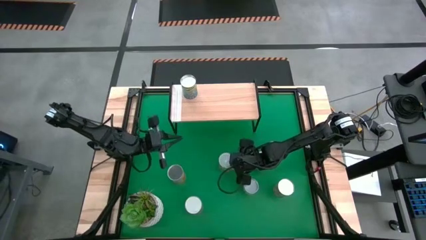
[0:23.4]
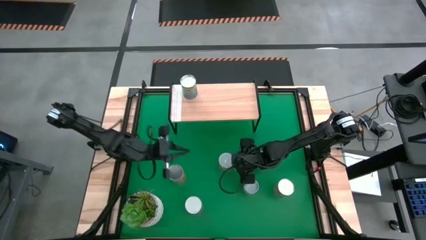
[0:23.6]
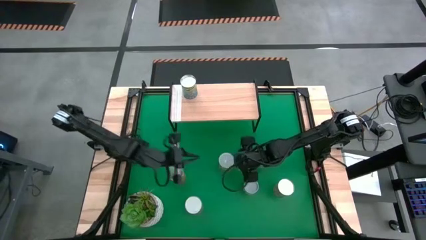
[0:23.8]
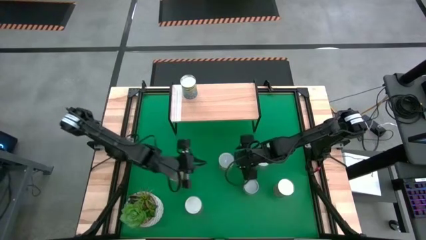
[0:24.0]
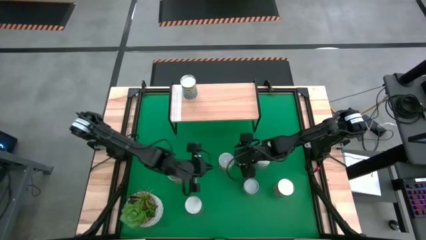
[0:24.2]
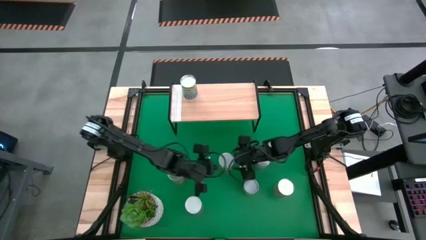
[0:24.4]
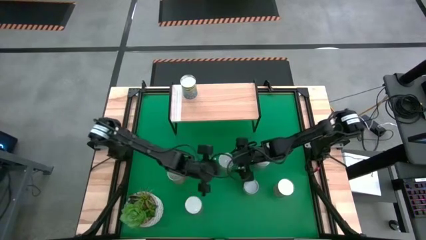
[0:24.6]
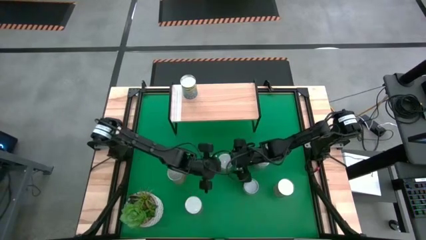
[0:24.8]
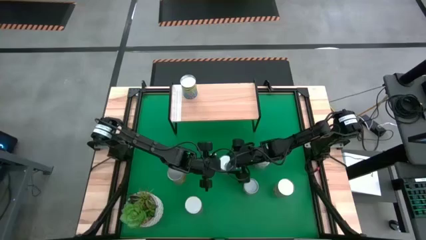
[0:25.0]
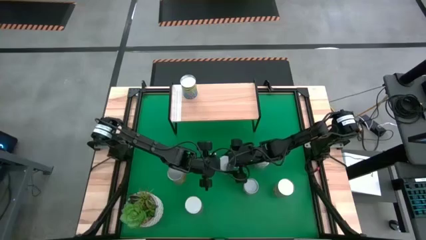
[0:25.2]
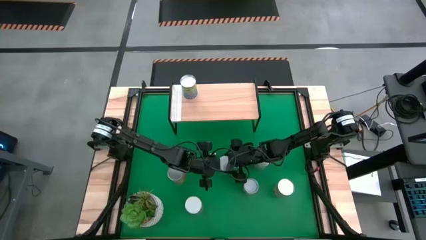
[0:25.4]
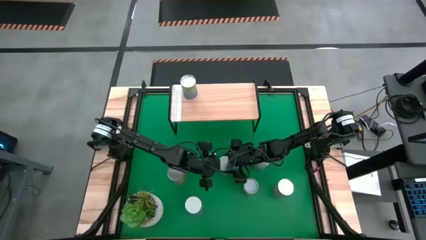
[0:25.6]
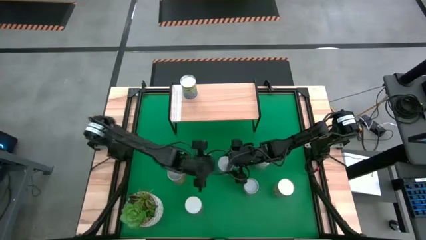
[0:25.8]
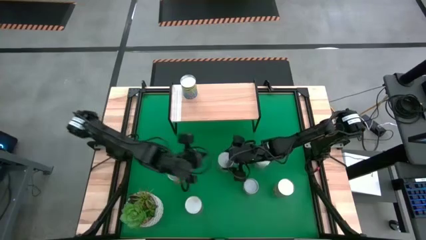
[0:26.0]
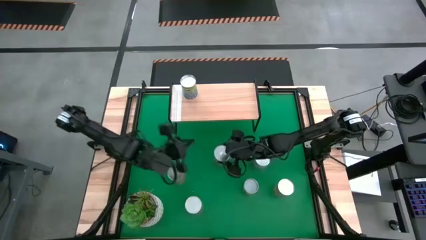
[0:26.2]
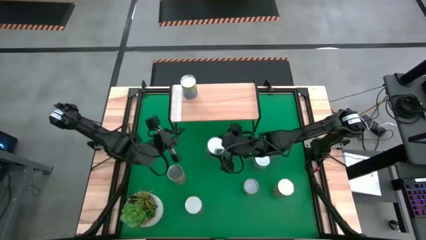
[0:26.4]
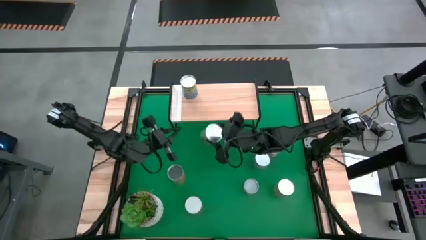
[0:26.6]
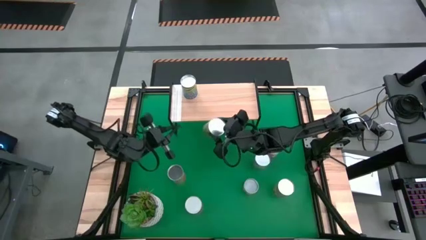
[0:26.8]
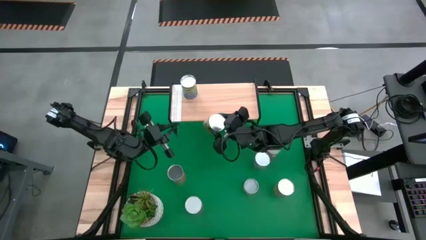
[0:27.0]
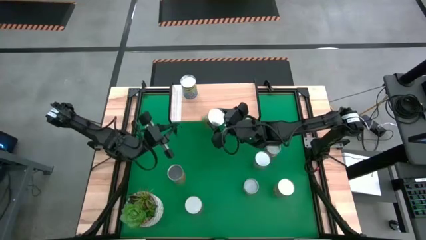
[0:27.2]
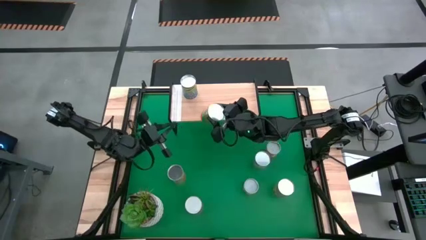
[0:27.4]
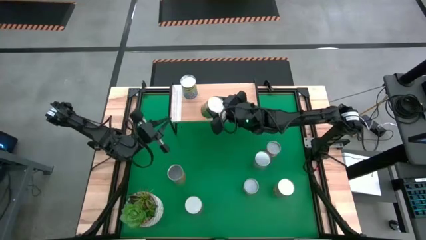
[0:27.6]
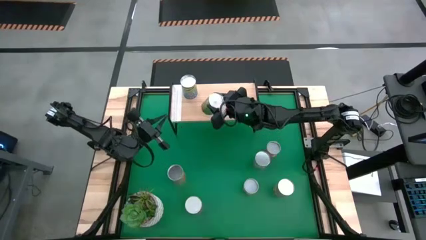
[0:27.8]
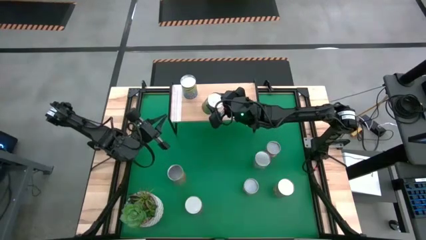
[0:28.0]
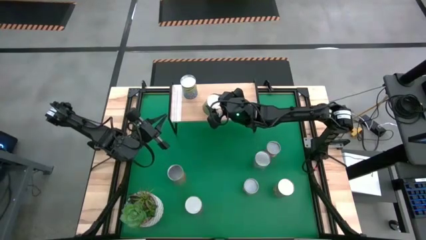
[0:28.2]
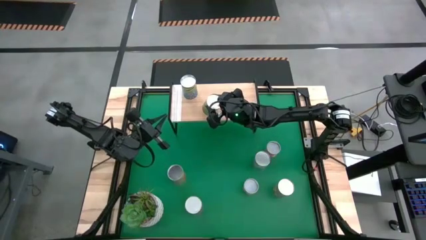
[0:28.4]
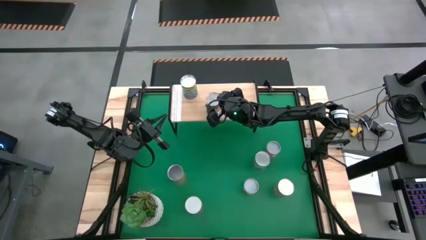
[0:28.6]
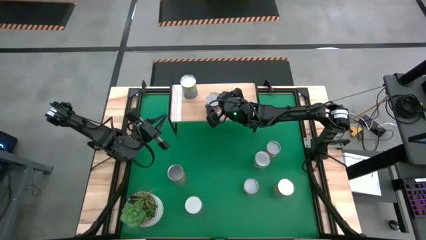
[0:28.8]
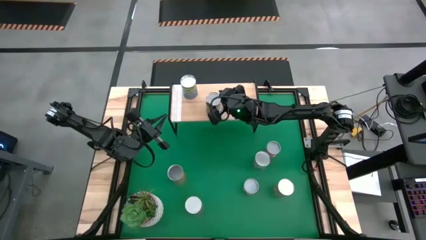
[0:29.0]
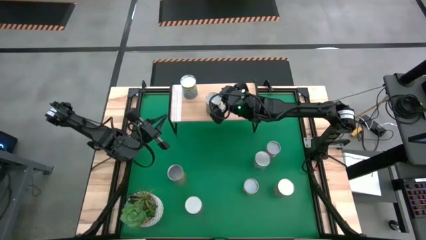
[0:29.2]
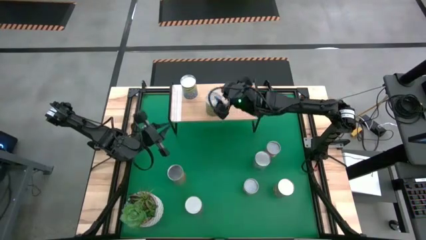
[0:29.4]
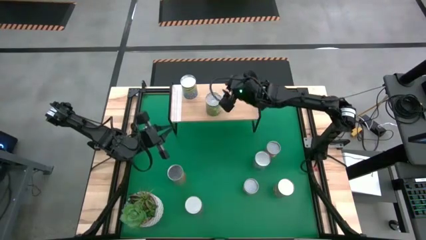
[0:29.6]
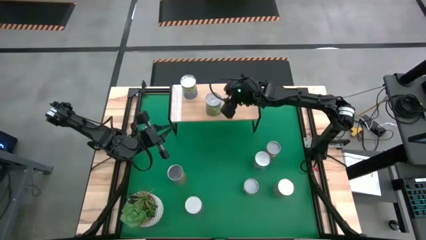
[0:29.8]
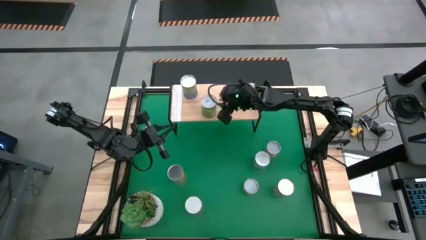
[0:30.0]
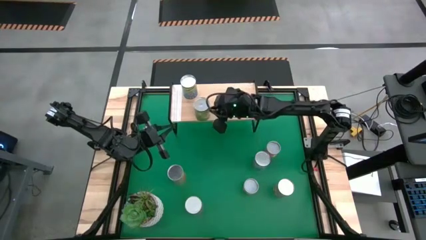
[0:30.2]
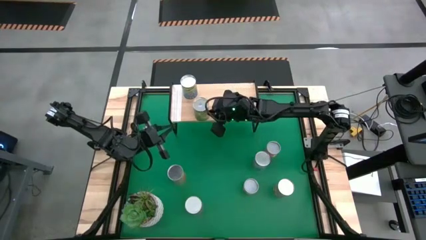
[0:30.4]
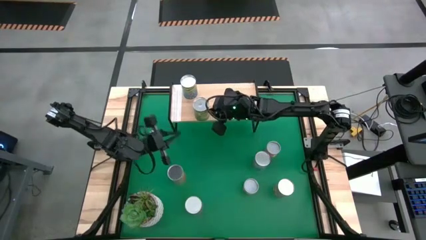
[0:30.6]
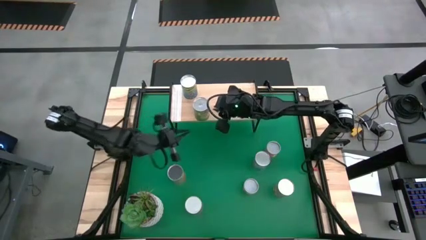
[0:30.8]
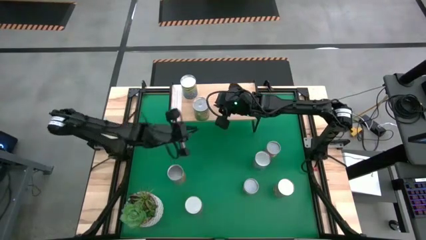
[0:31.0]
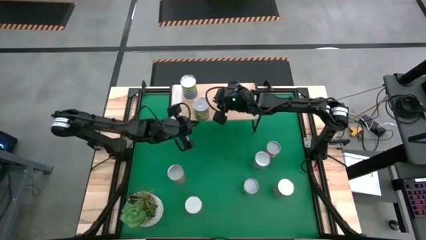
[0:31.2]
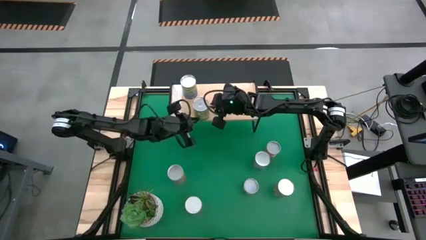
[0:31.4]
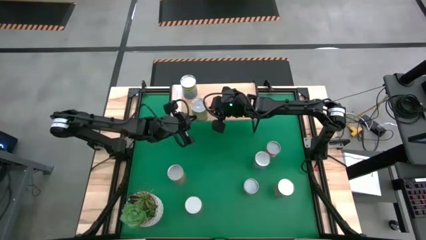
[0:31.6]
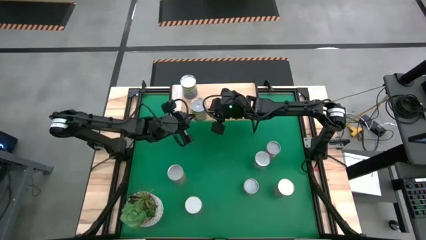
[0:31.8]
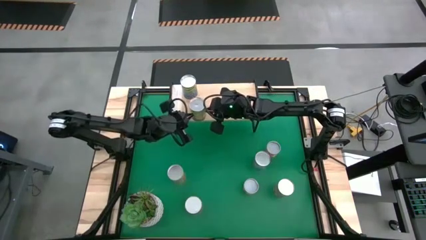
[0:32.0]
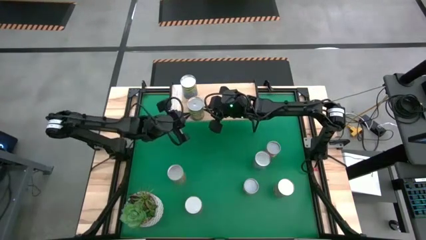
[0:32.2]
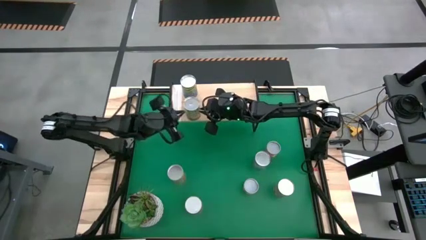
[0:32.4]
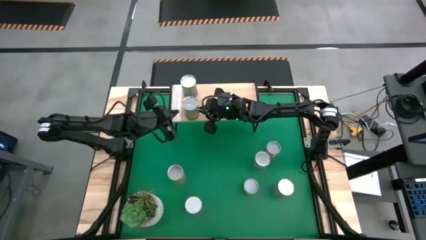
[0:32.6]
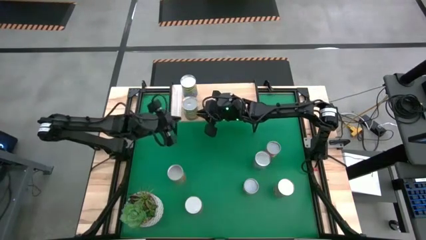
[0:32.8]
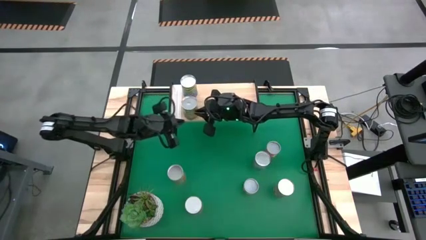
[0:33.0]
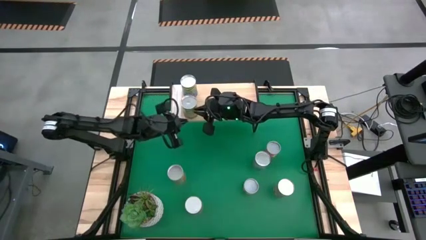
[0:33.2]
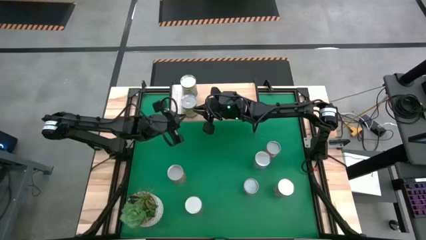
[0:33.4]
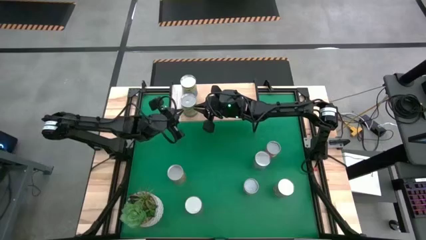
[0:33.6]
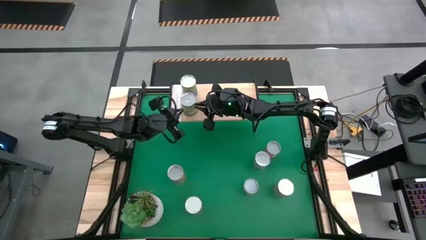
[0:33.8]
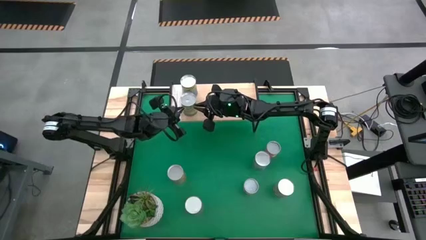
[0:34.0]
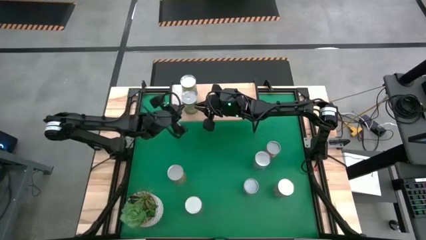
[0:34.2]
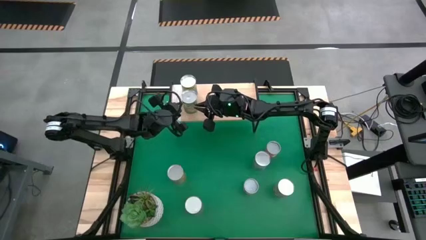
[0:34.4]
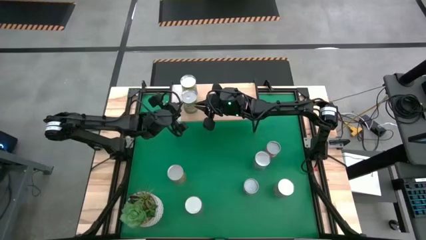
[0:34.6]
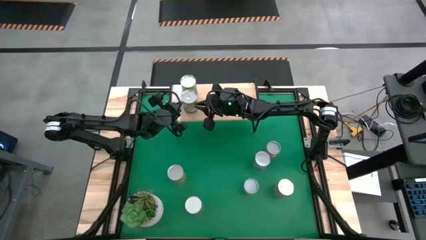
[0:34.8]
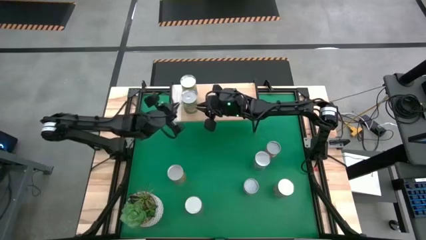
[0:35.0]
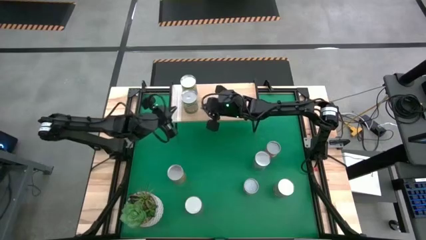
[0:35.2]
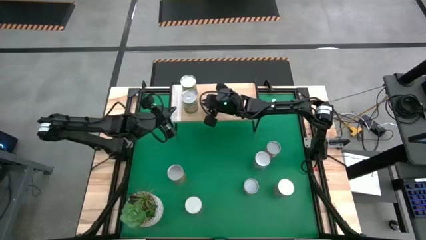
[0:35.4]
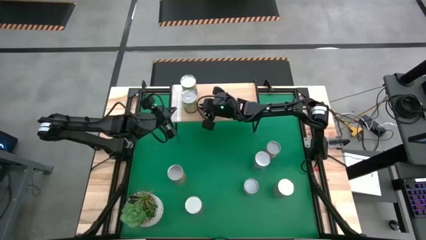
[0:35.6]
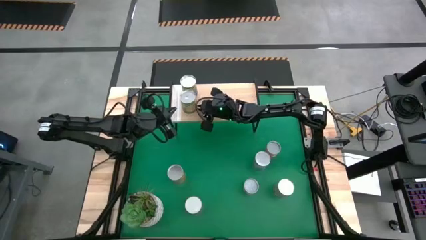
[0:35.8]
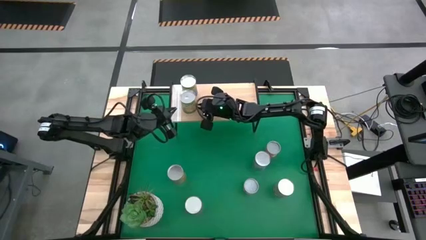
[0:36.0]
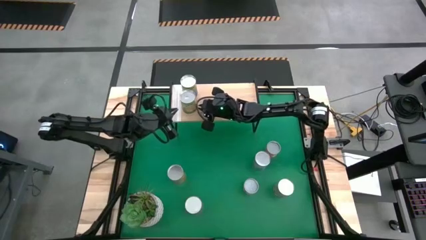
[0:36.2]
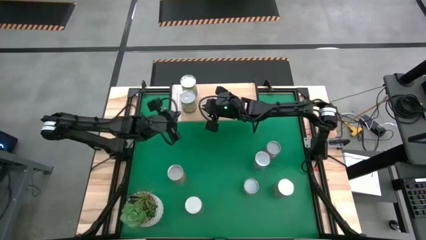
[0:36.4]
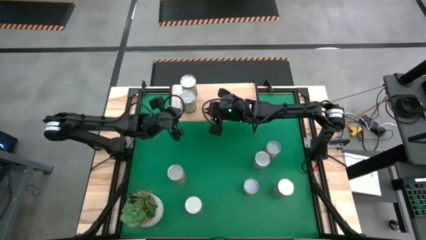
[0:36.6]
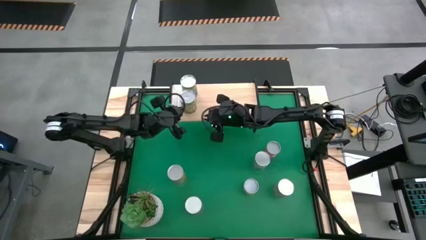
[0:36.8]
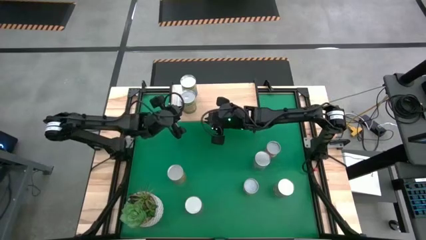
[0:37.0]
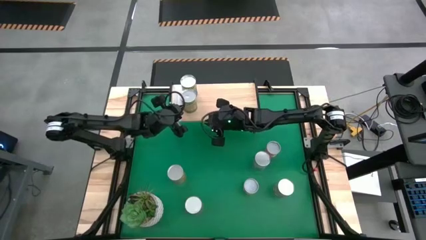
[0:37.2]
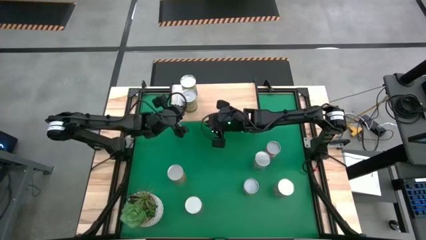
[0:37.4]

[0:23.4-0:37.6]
Task: Pick and place cans onto a shelf
Put the canned oranges on the shelf
